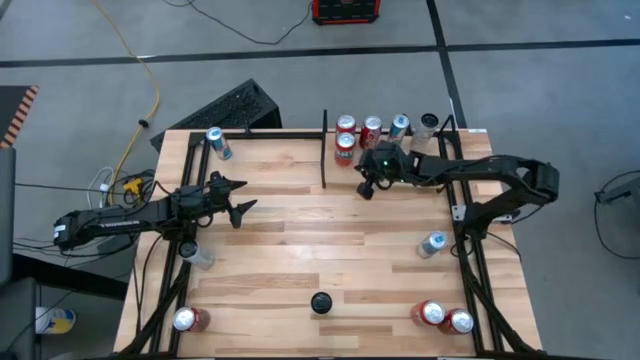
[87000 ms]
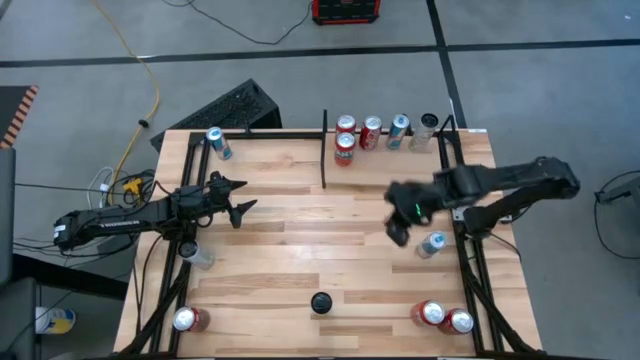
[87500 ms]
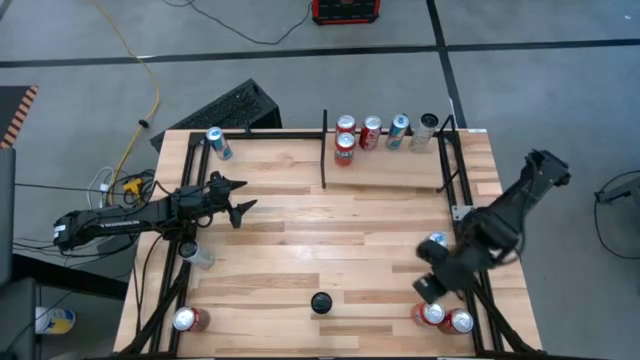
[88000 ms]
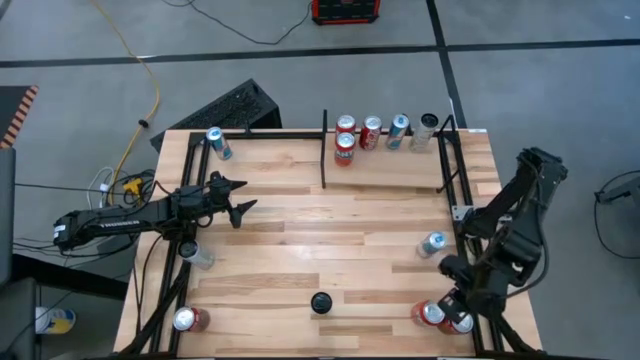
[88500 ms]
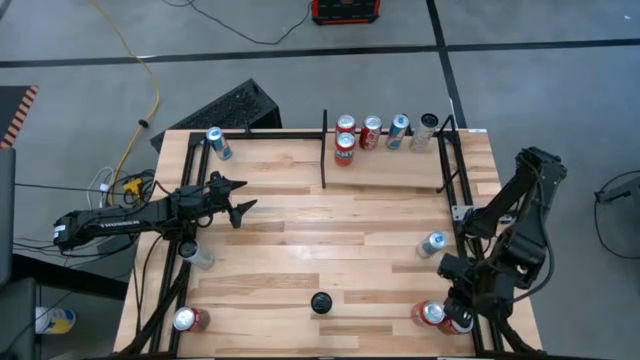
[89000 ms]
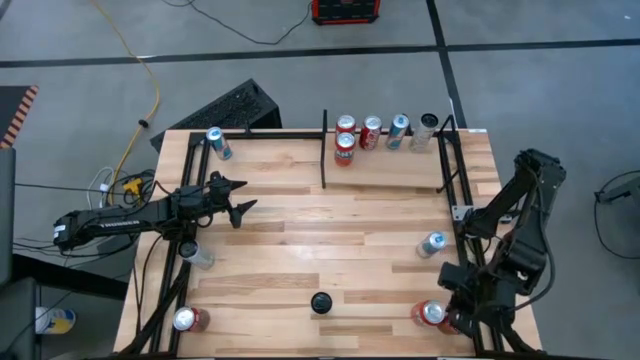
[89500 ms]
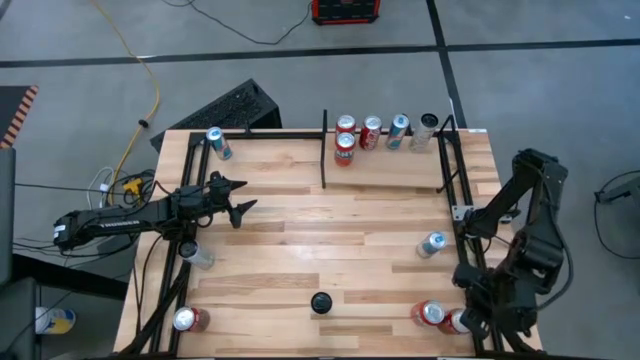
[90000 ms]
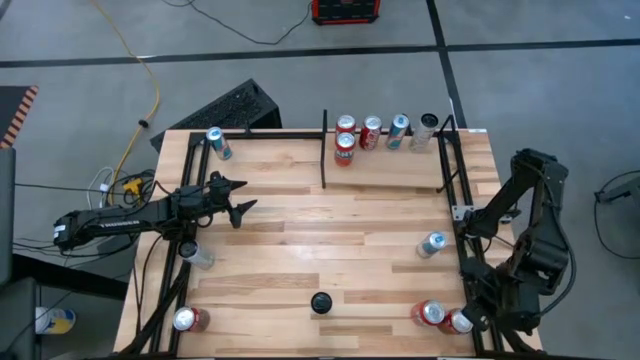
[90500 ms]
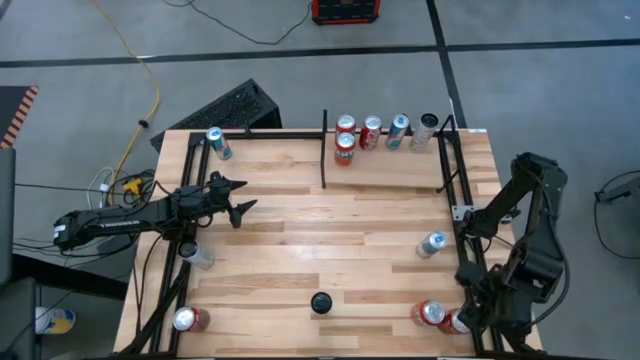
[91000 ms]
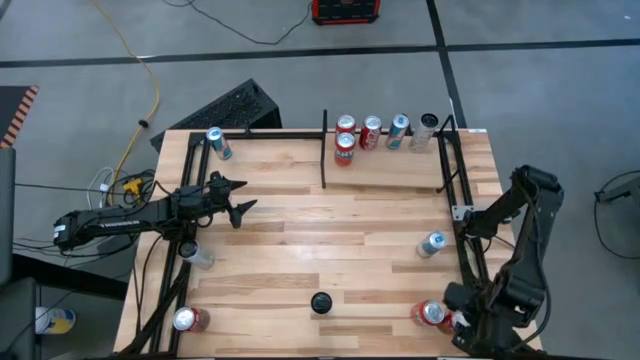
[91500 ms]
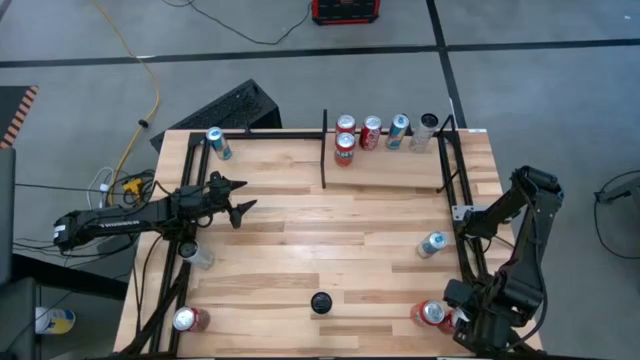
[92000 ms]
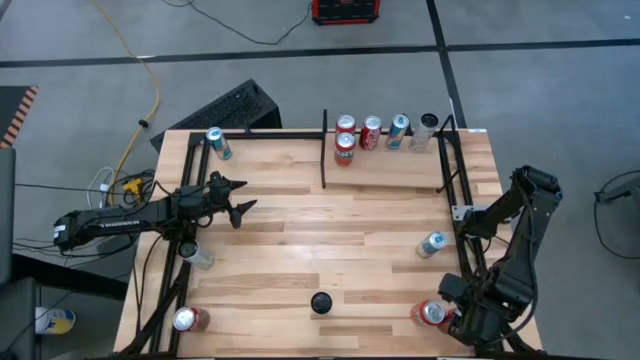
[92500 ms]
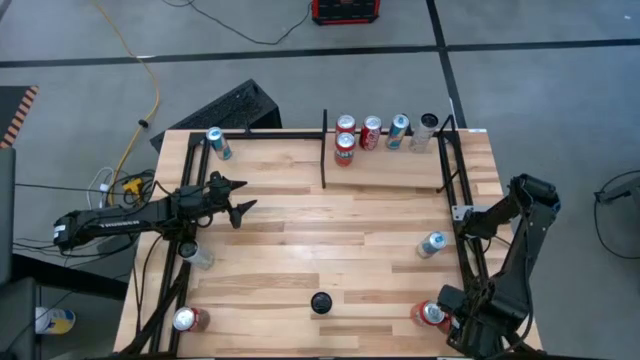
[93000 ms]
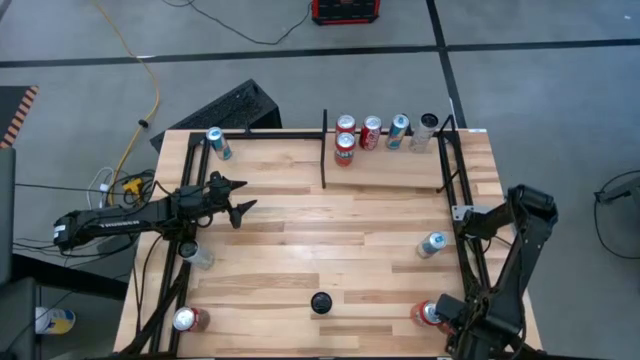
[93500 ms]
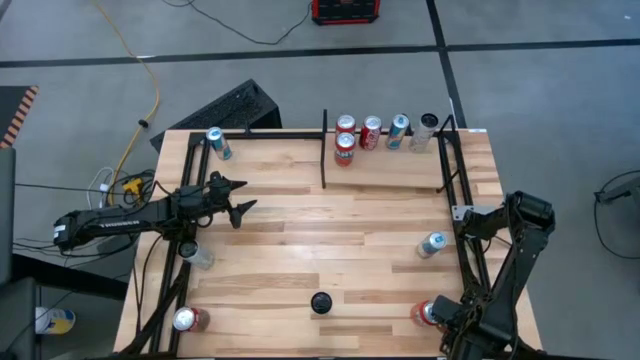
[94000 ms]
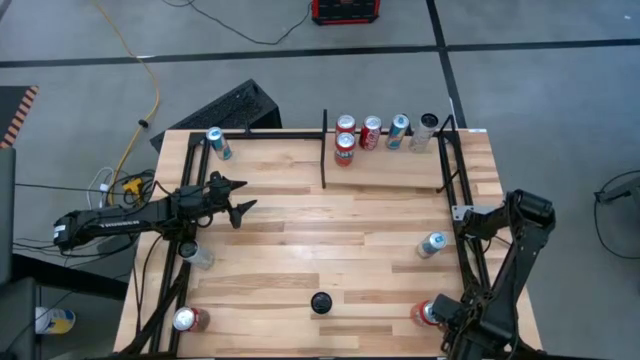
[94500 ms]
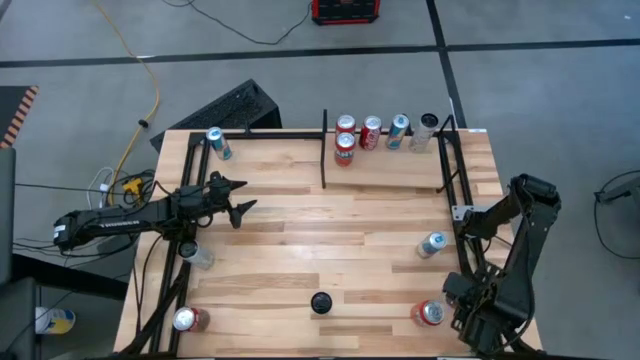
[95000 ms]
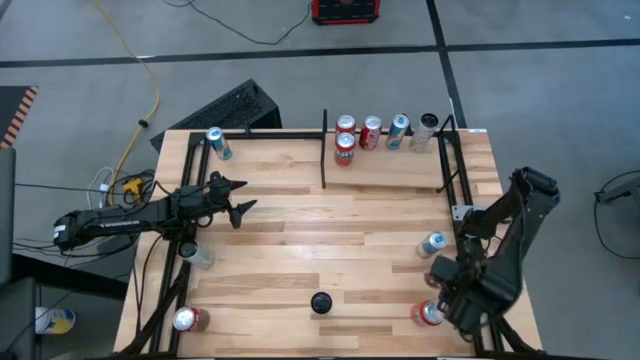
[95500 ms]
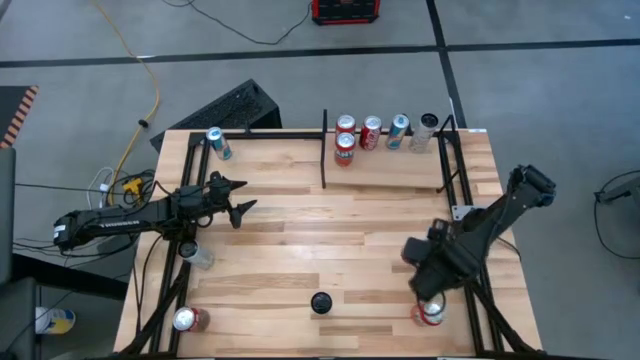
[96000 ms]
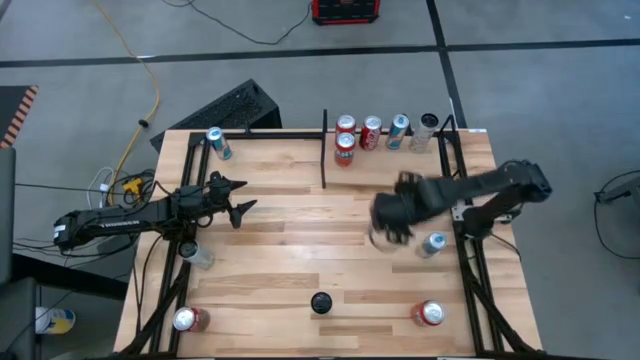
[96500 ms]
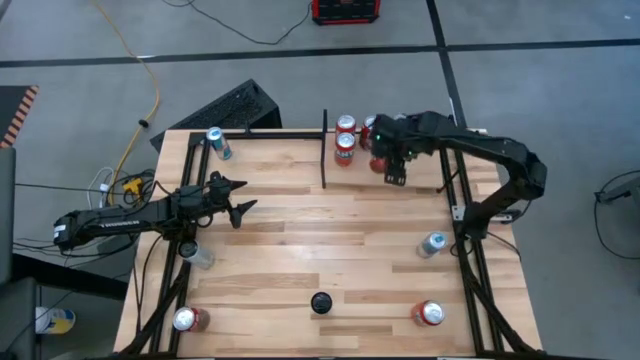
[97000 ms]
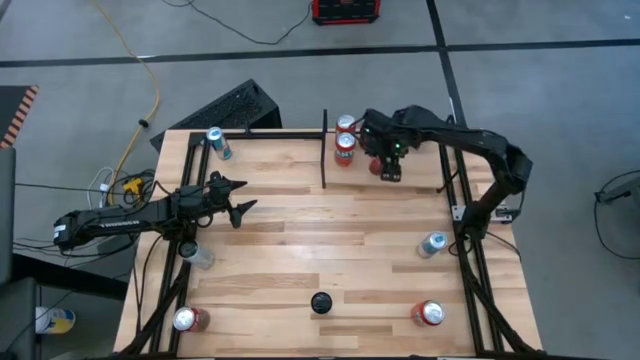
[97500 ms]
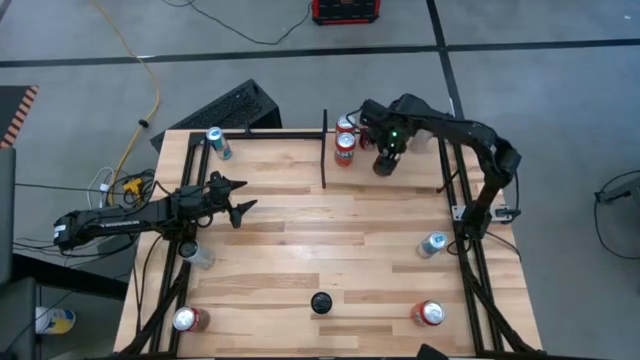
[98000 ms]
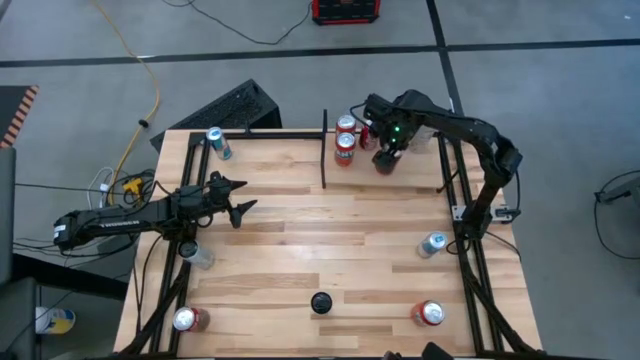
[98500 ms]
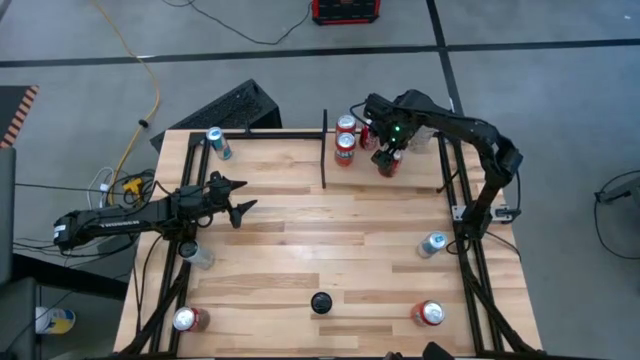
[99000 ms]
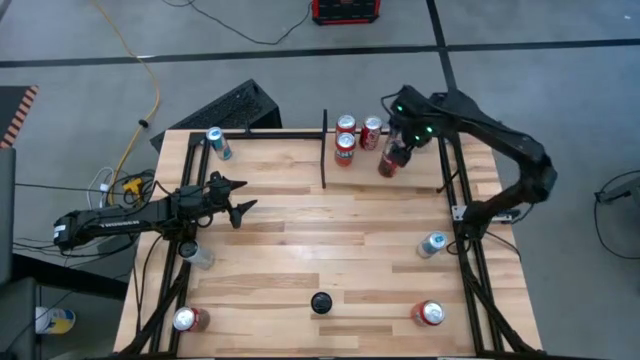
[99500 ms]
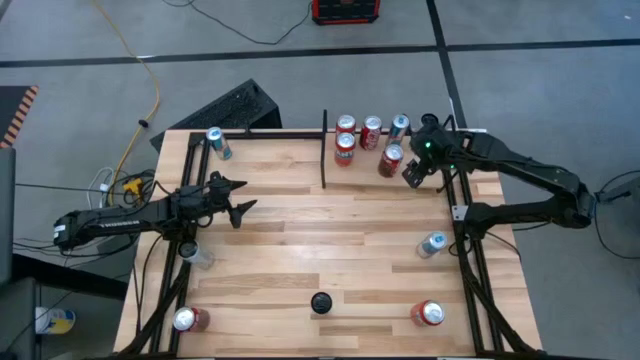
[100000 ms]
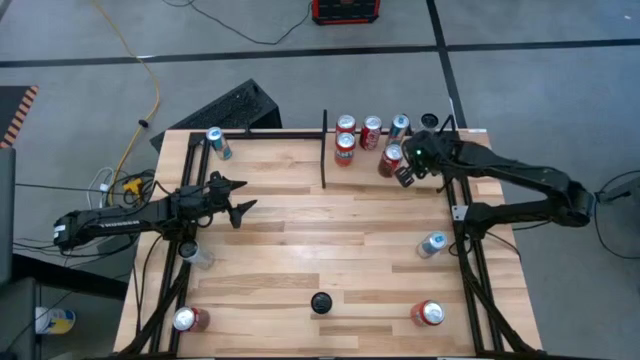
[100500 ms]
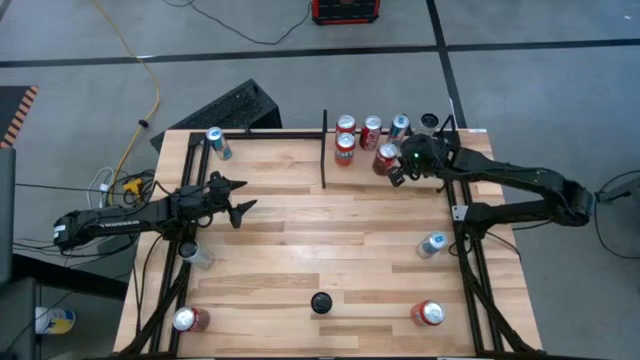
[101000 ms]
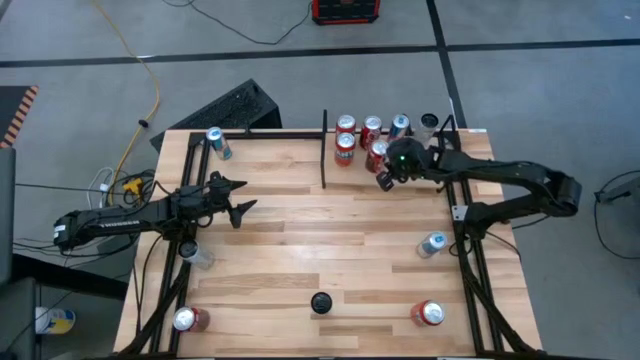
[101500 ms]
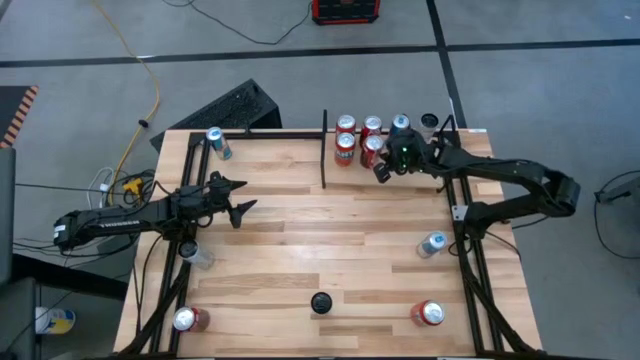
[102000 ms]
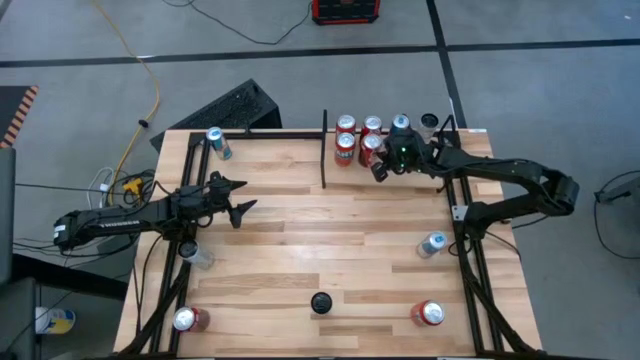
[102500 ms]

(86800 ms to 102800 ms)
Task: Place canned beverage on shelf
Put the right red-white soda can on the shelf aligned with the other red-white soda can

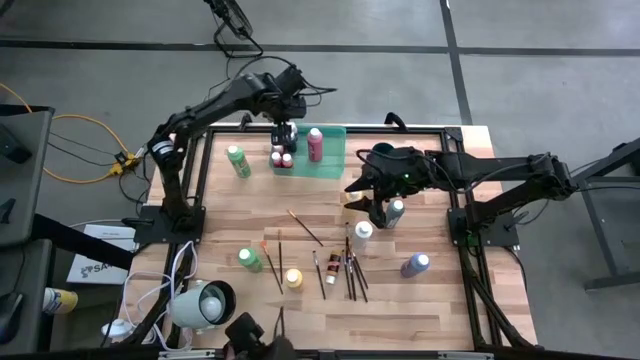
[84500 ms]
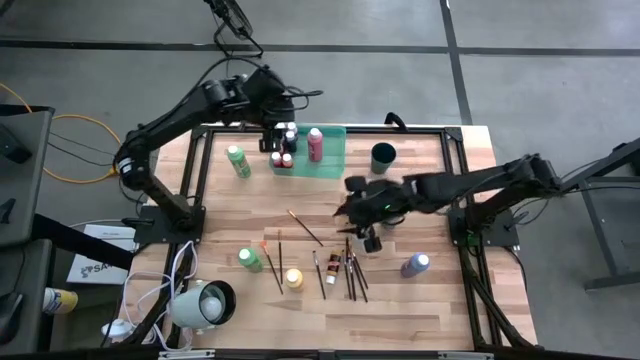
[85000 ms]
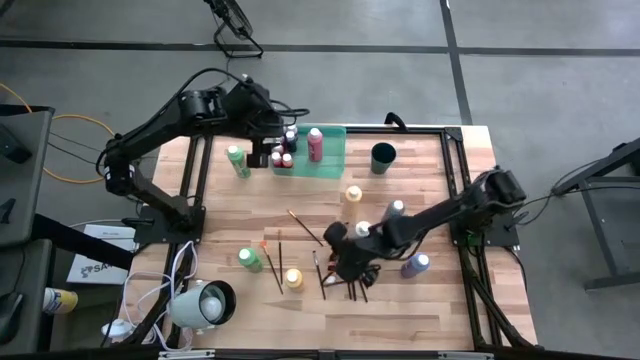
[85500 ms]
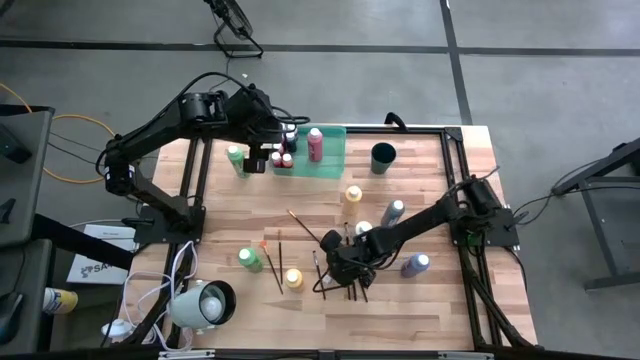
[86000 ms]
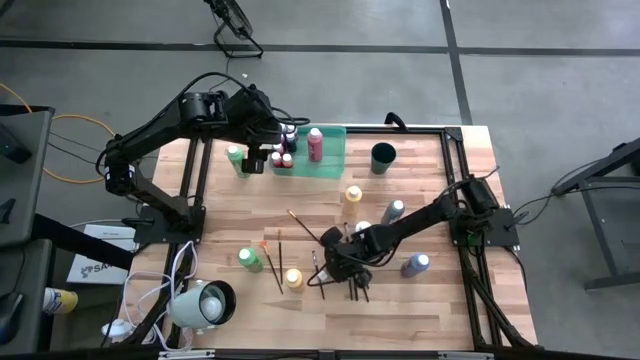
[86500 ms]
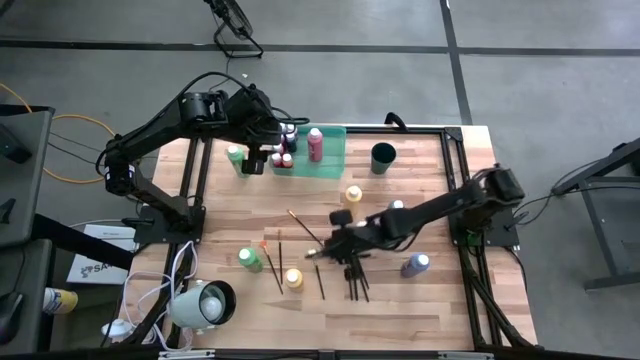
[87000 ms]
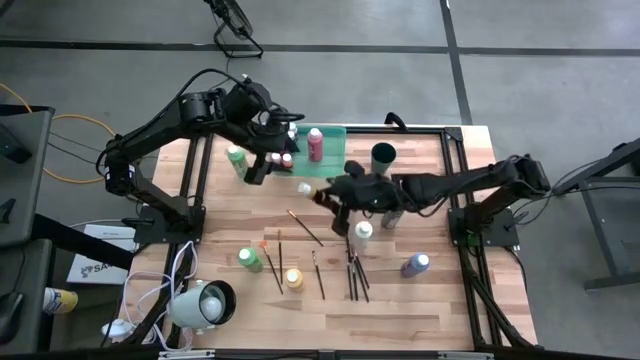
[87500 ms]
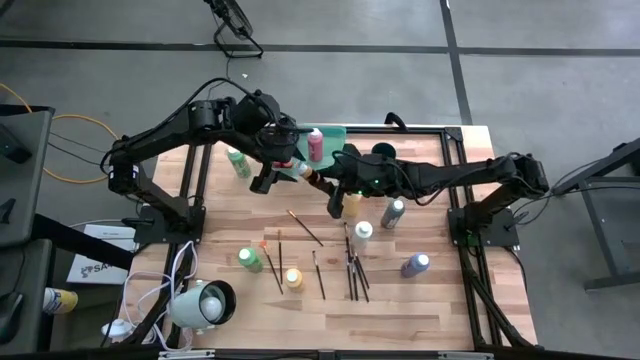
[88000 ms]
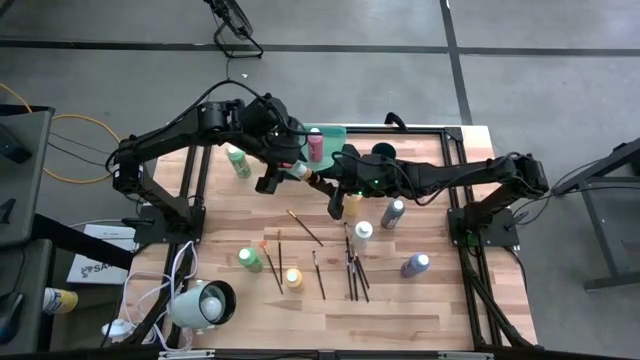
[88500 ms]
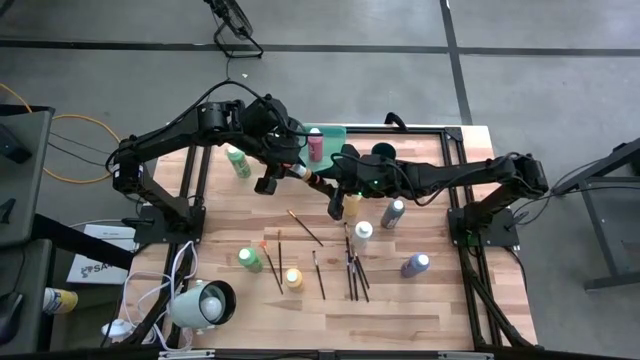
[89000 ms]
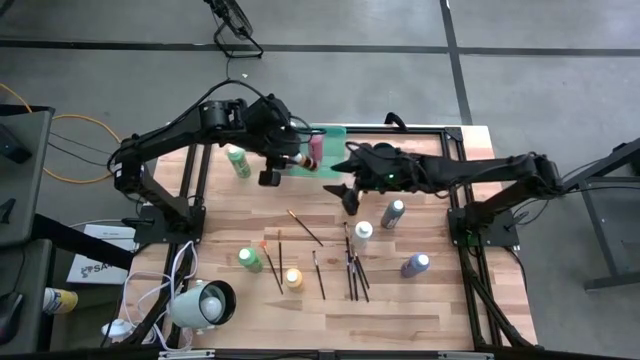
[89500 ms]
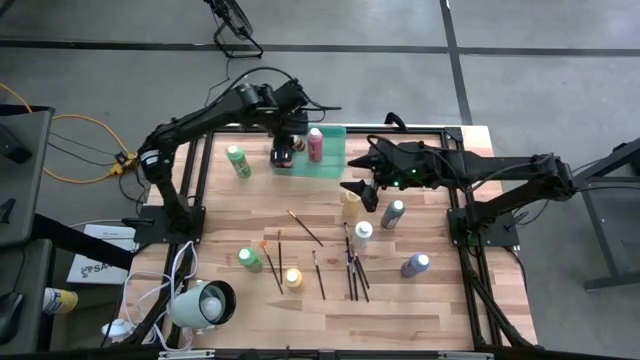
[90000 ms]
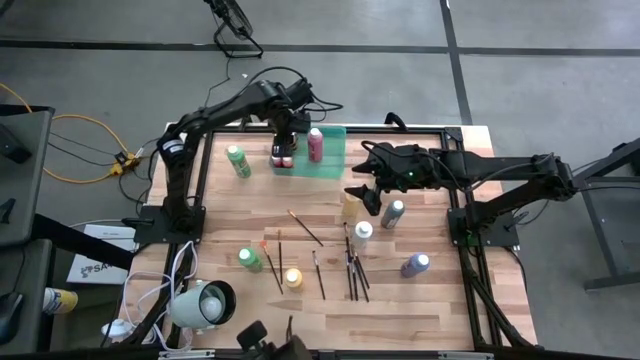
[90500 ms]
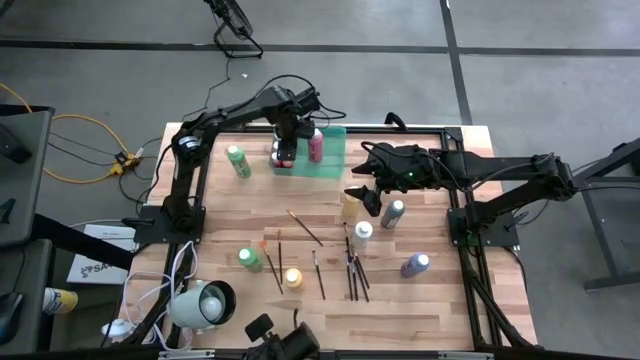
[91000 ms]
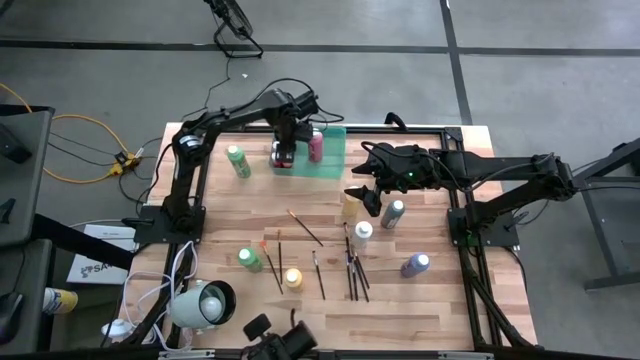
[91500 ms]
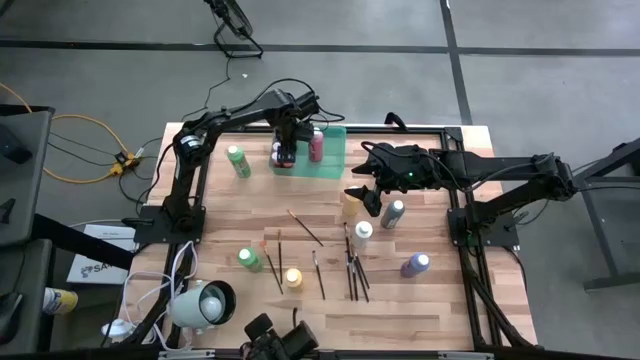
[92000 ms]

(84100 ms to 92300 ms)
Task: Pick & Place Paint Supplies
Put the small yellow paint bottle into the green bin
